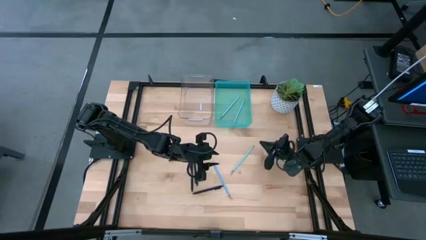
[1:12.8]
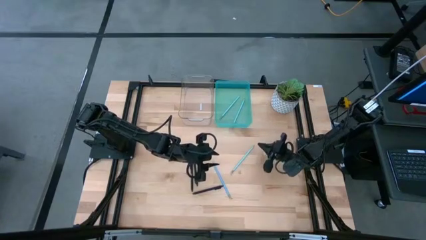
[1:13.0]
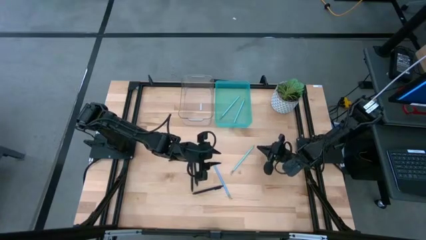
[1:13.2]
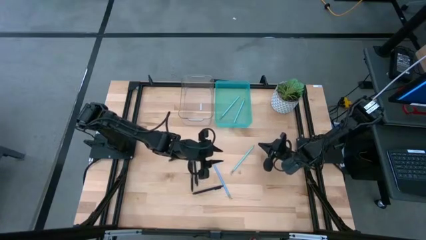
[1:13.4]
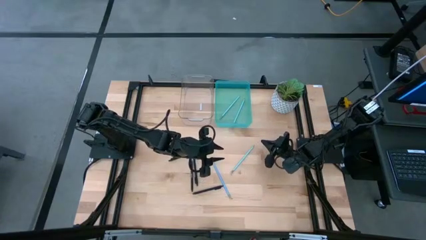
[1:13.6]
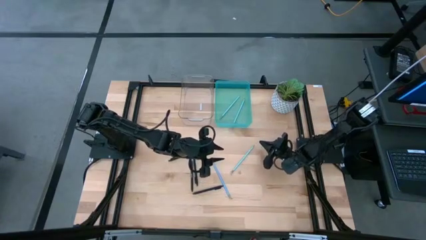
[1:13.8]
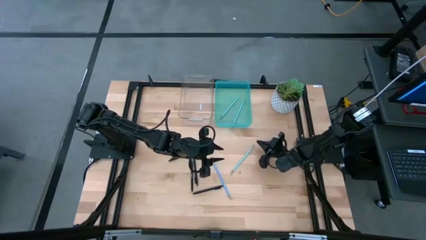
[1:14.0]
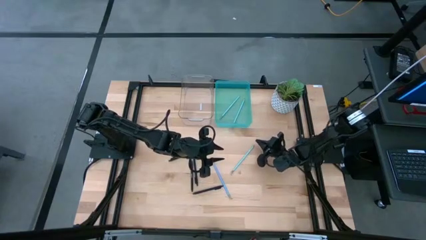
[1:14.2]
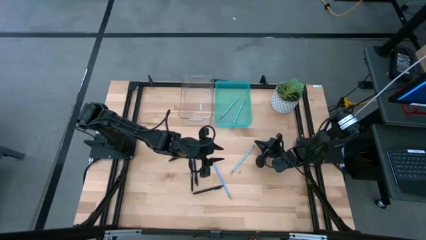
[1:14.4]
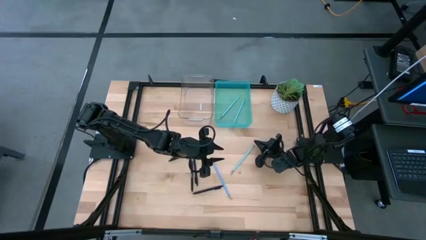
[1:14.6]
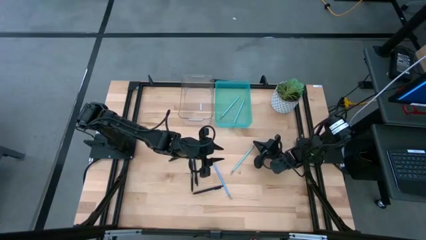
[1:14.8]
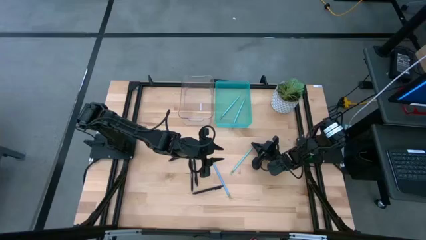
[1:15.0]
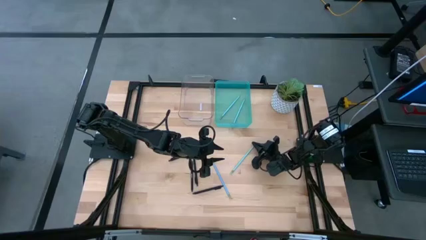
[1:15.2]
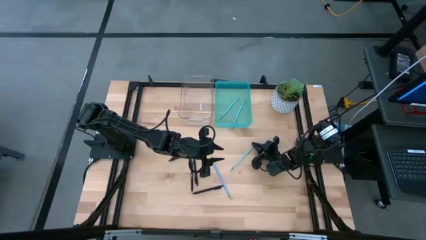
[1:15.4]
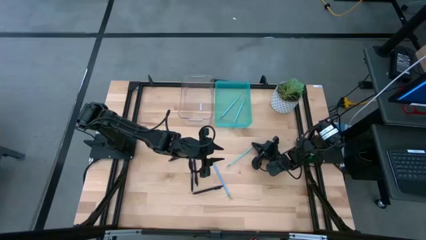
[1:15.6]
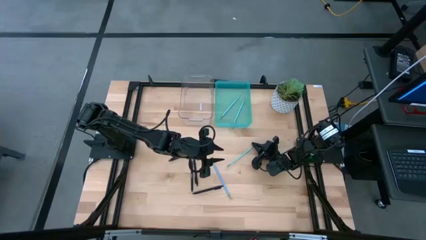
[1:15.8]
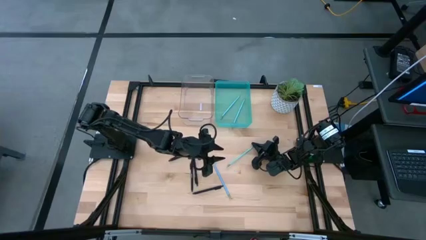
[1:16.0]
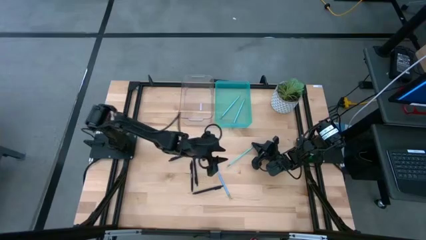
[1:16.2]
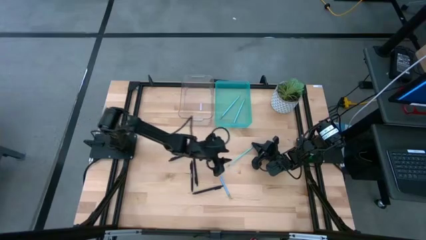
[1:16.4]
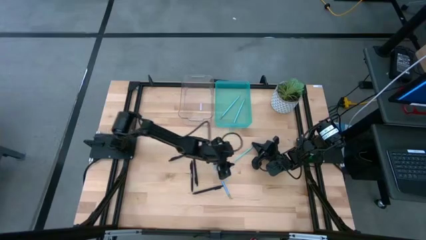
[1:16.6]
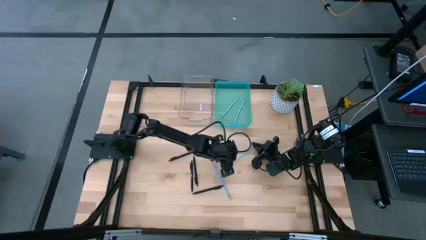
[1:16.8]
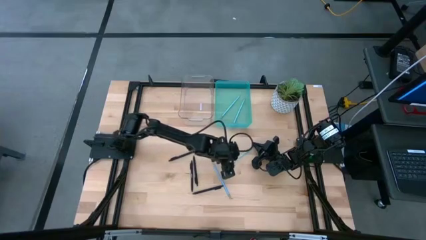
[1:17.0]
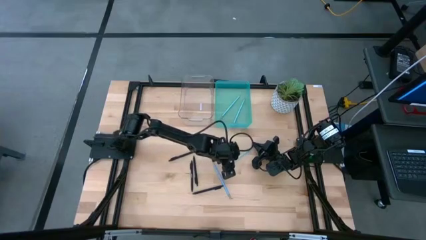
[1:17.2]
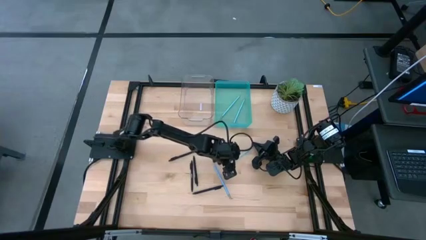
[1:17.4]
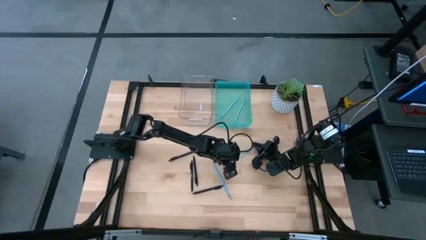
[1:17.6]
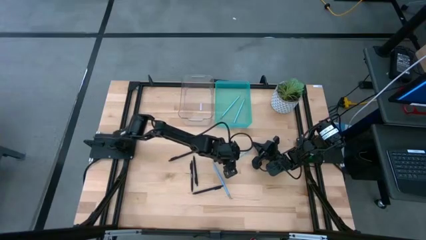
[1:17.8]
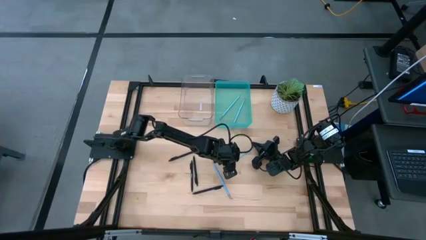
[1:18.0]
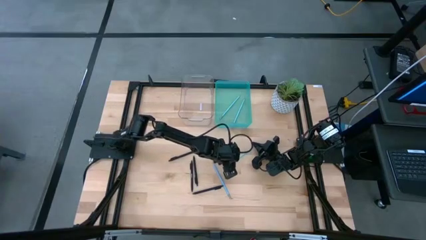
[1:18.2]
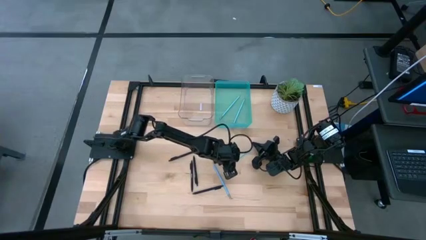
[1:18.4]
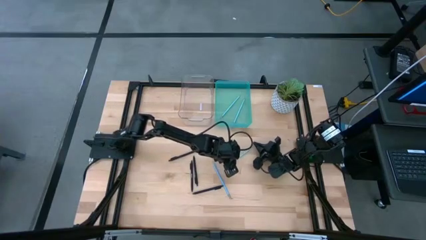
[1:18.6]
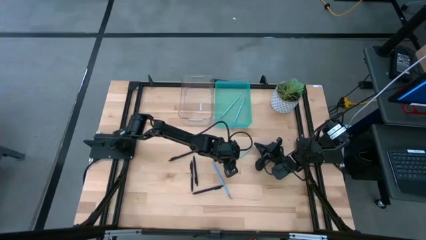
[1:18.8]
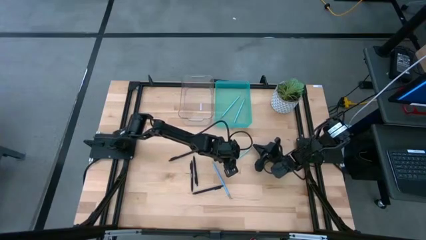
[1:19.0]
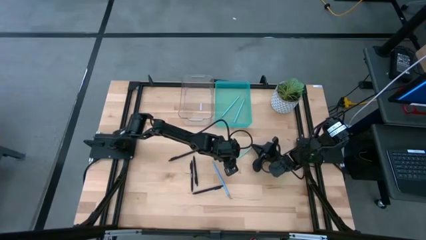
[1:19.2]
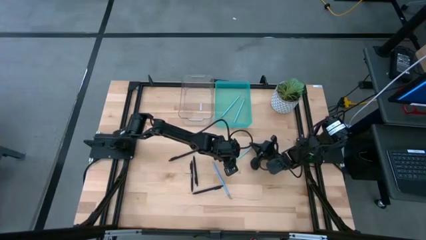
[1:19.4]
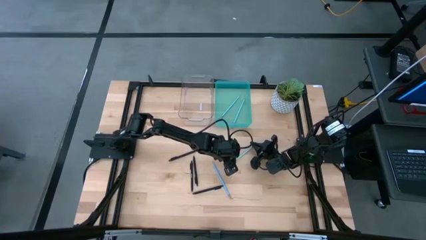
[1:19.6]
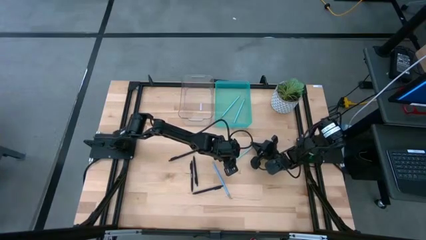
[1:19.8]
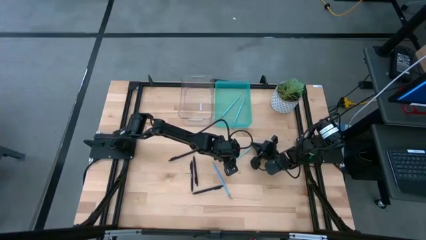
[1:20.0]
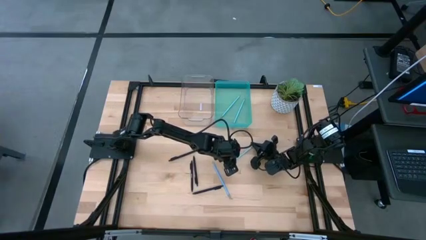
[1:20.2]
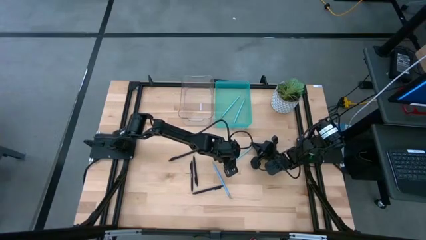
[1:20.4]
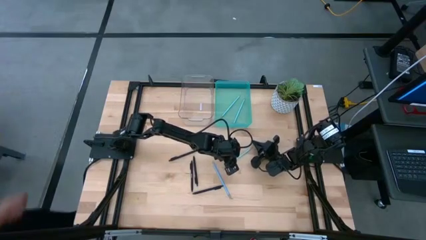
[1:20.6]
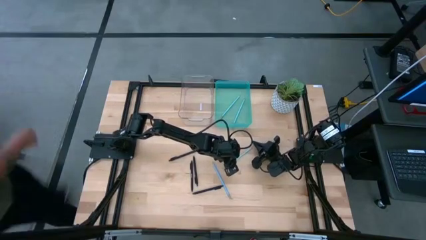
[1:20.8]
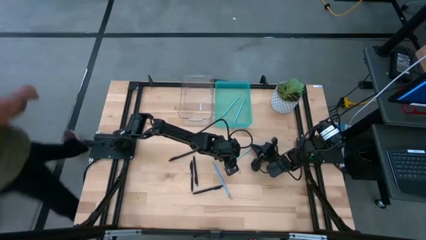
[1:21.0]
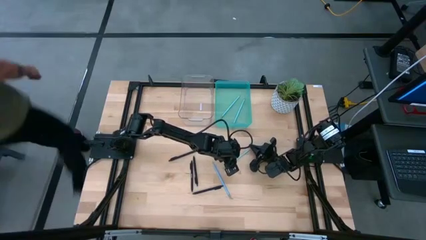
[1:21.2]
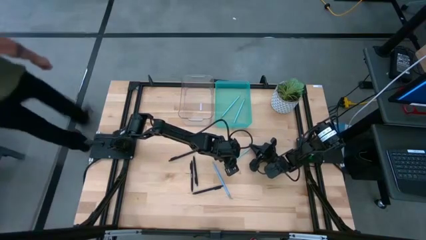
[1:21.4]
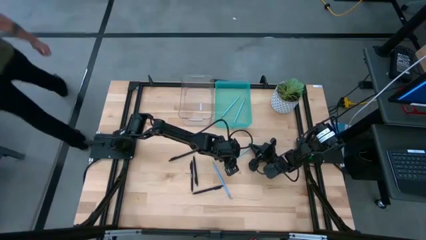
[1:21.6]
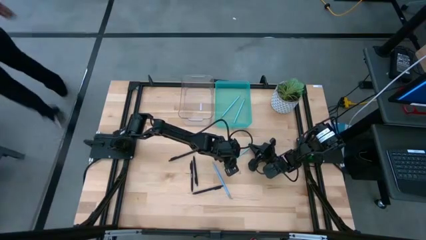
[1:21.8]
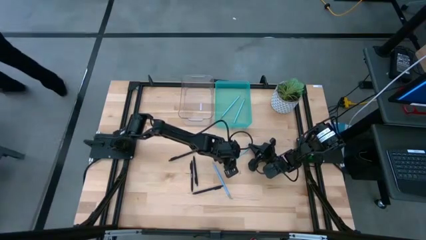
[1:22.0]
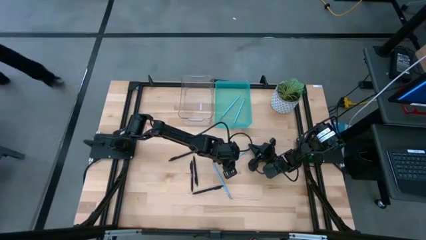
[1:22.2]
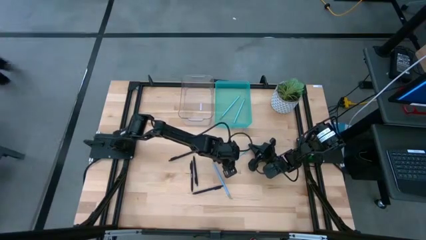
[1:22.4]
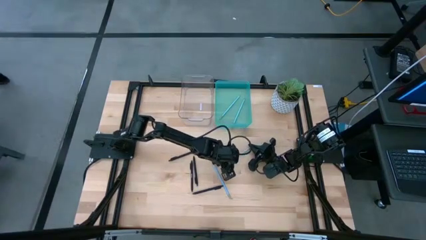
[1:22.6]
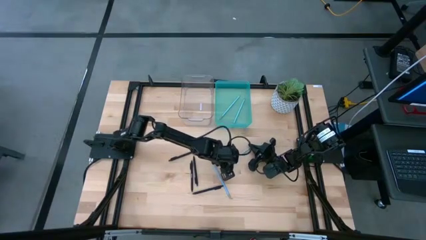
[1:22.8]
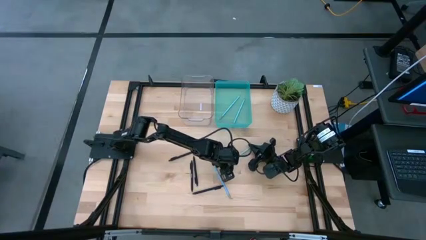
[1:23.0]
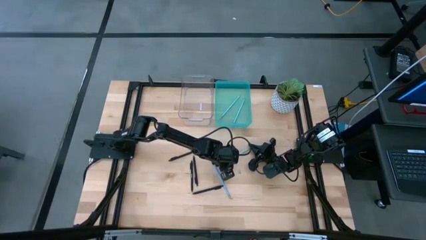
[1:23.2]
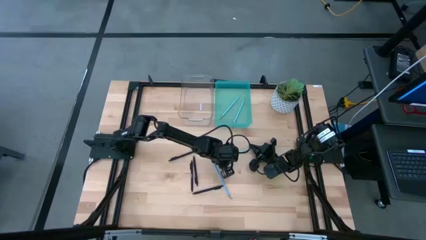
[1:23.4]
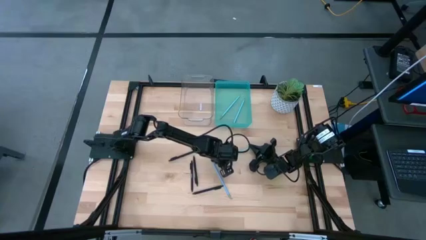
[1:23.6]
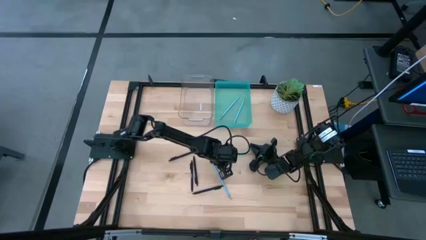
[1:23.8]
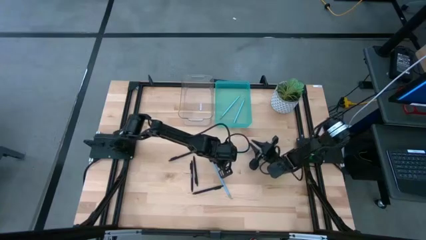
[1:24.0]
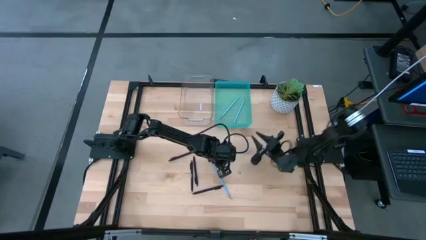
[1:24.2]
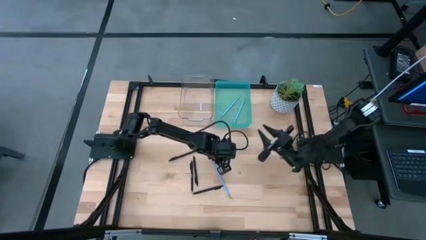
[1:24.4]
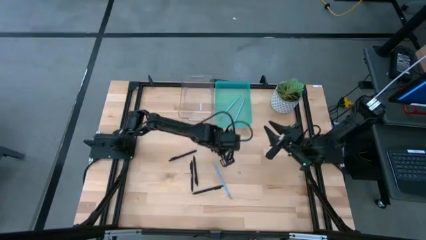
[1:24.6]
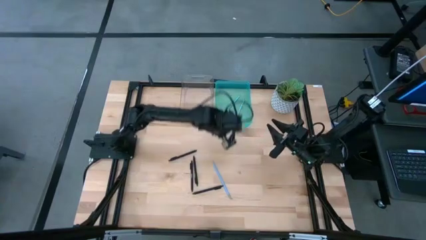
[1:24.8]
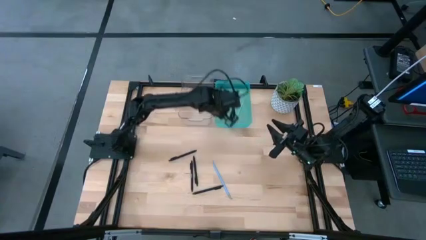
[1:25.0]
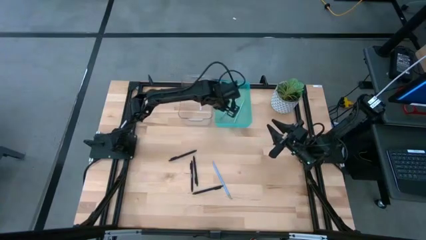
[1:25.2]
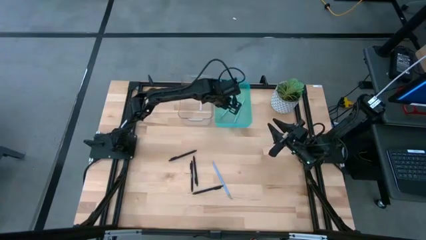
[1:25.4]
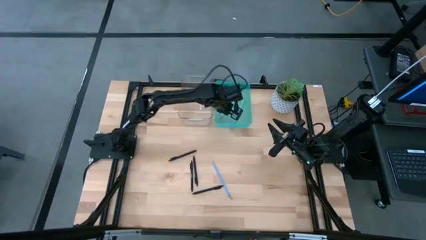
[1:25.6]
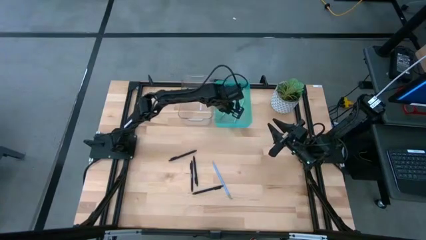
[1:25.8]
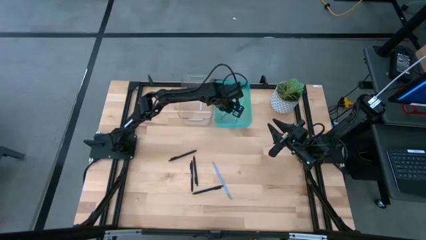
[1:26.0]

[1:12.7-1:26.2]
Task: Sort pens & pencils
Put the light blue pencil into the light blue bin
